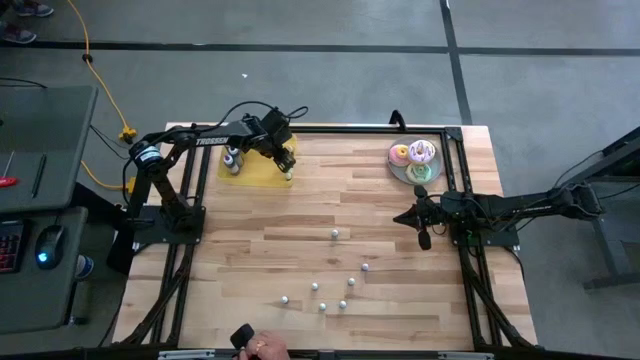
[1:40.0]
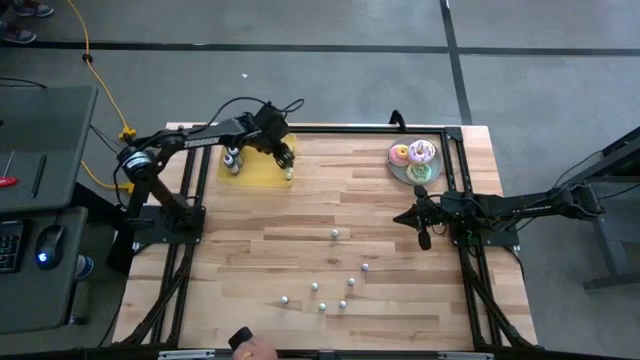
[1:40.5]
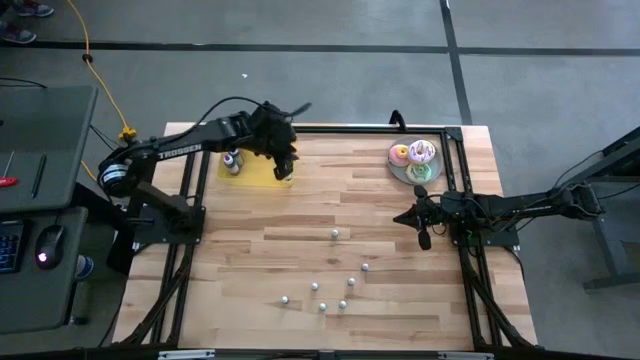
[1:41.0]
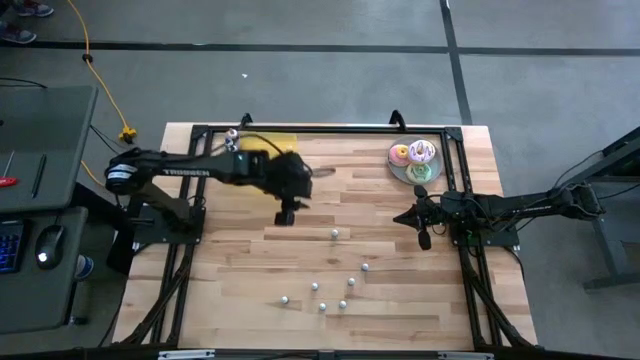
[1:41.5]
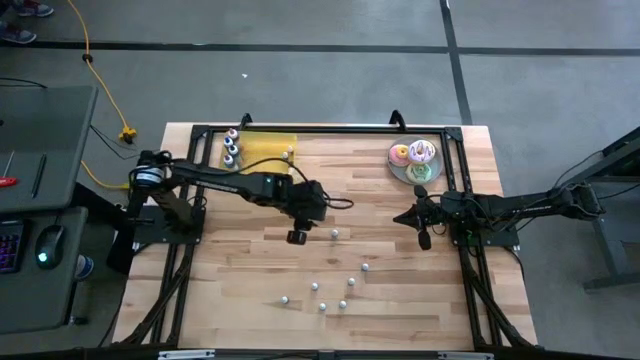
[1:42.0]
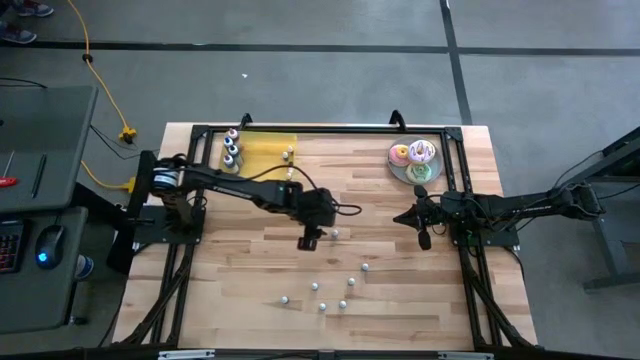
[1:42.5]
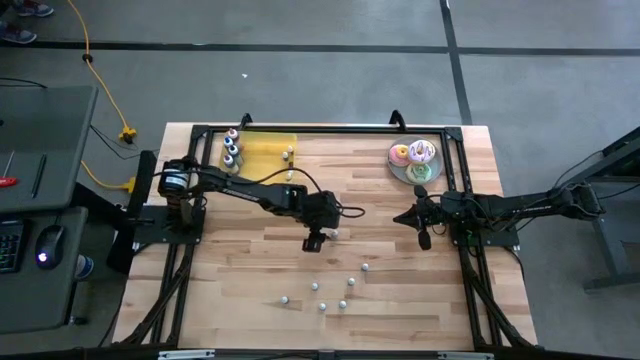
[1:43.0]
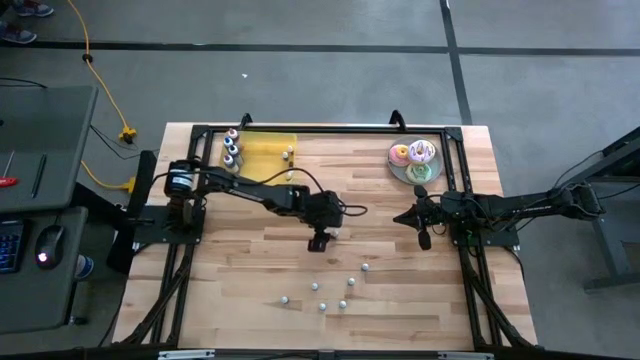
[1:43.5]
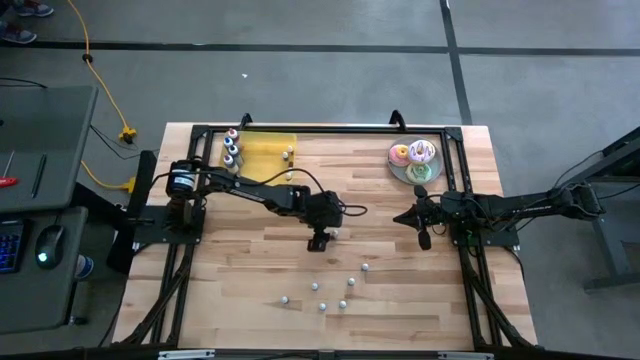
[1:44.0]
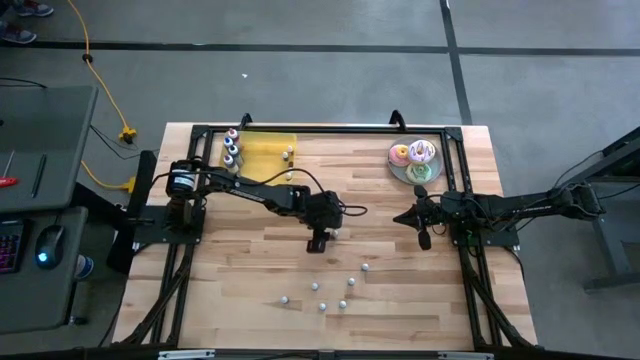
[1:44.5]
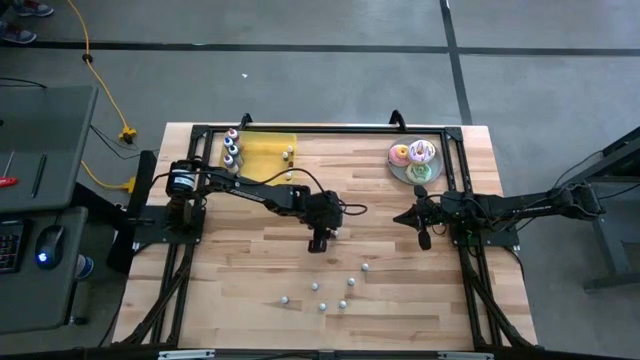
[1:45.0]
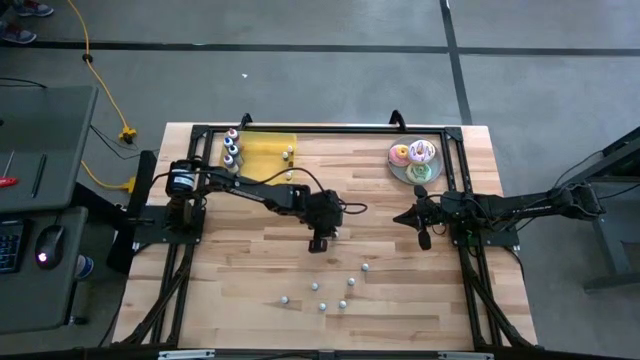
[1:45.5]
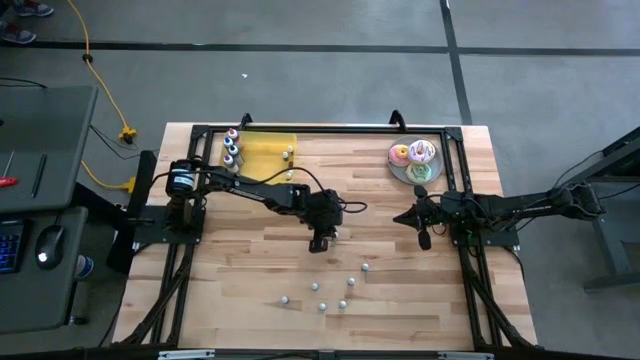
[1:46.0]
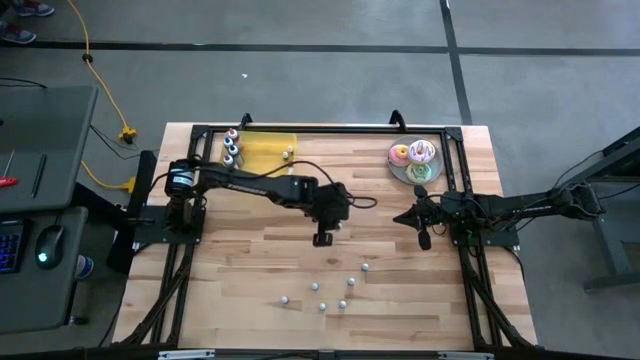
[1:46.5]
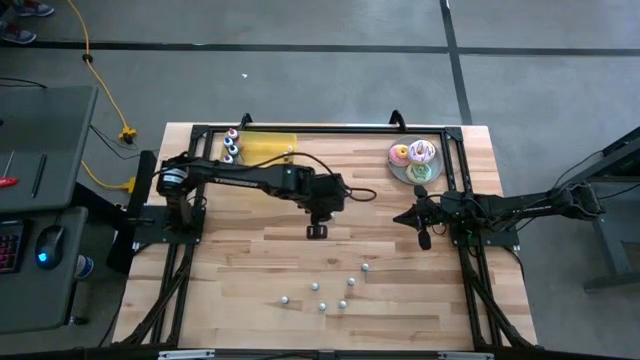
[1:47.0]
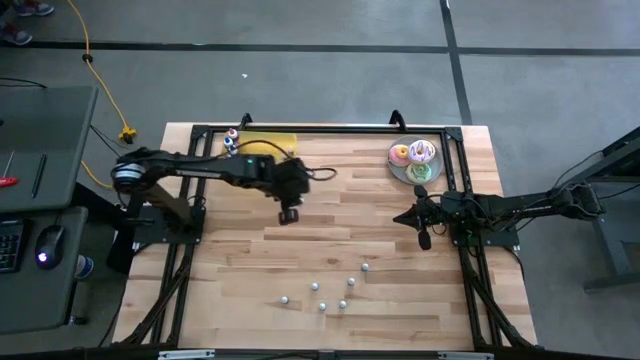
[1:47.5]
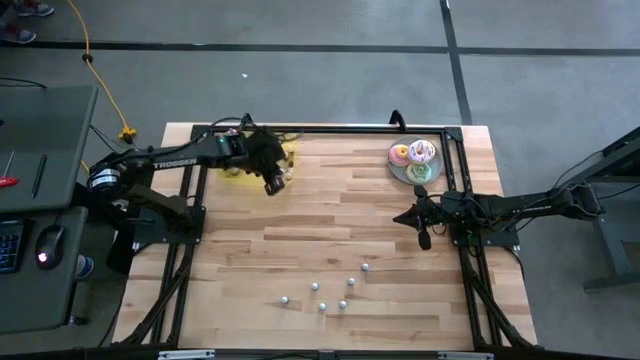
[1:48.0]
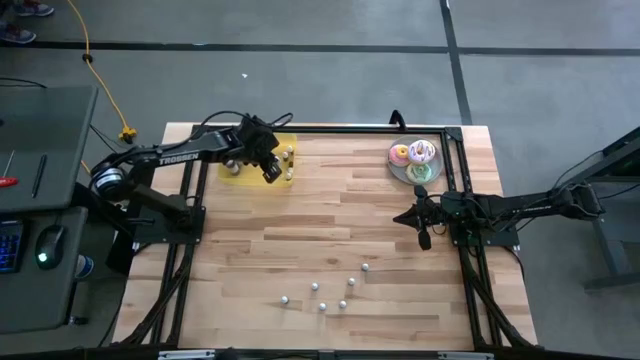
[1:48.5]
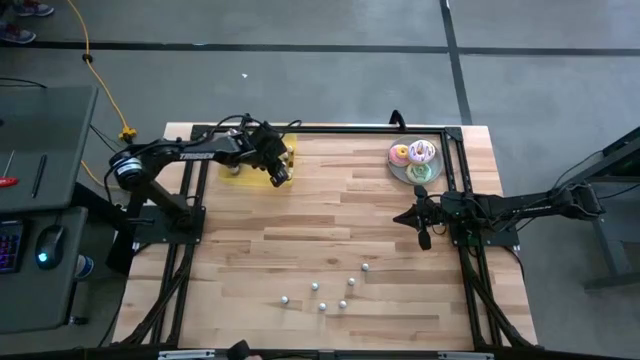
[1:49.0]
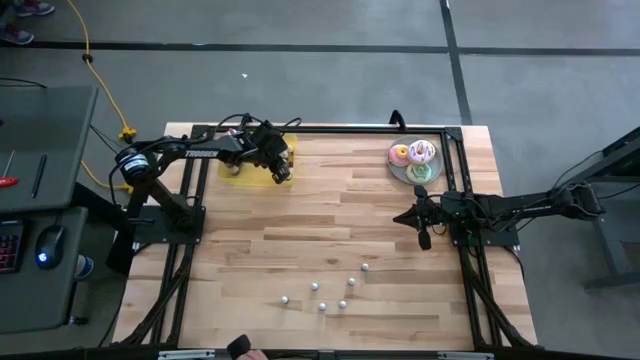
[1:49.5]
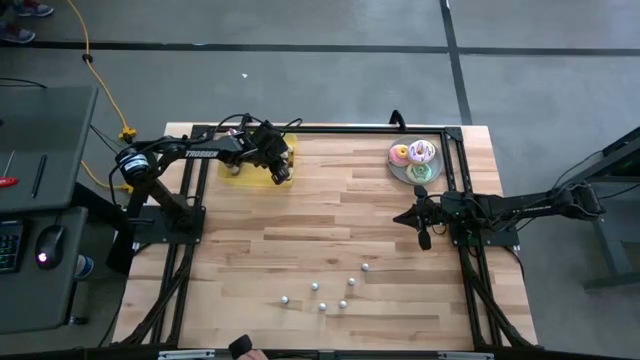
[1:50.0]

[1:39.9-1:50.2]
Task: Pick & Place food coloring
Put the small black food coloring bottle into the yellow bin

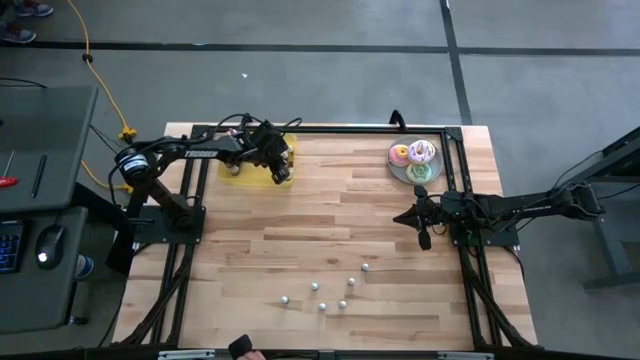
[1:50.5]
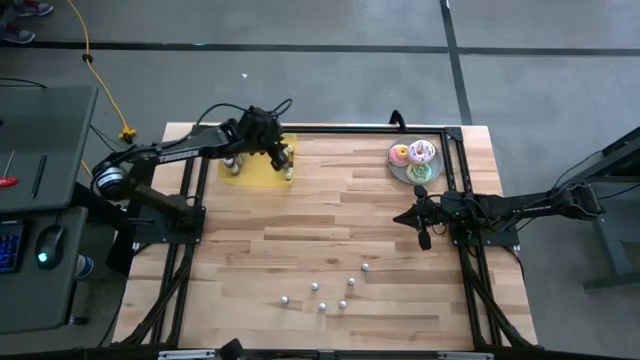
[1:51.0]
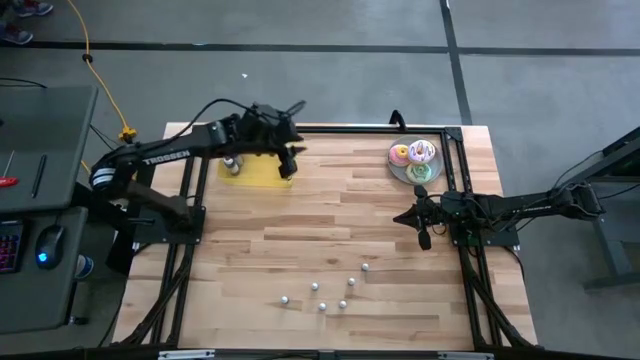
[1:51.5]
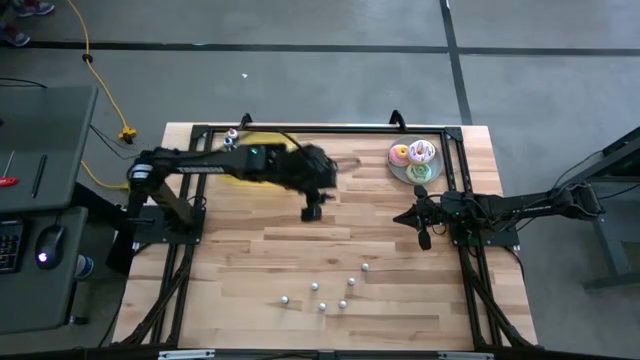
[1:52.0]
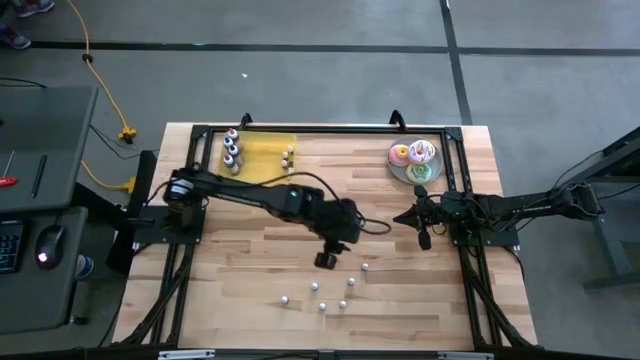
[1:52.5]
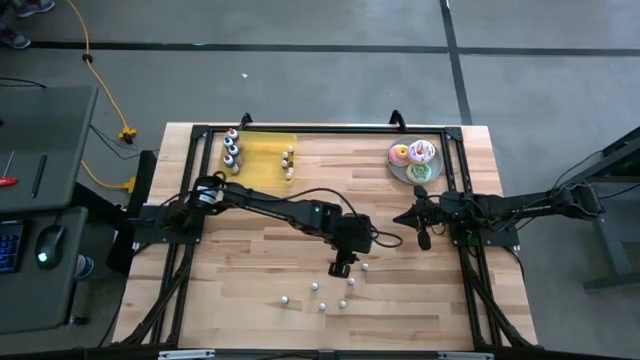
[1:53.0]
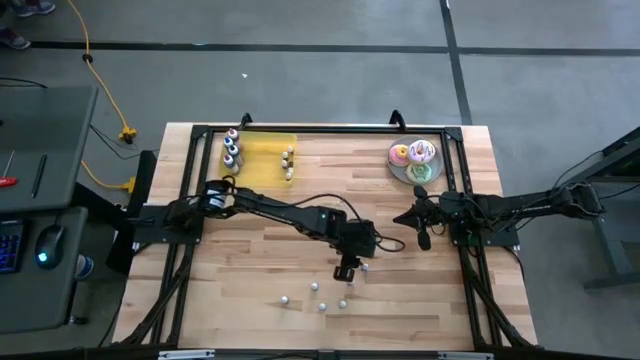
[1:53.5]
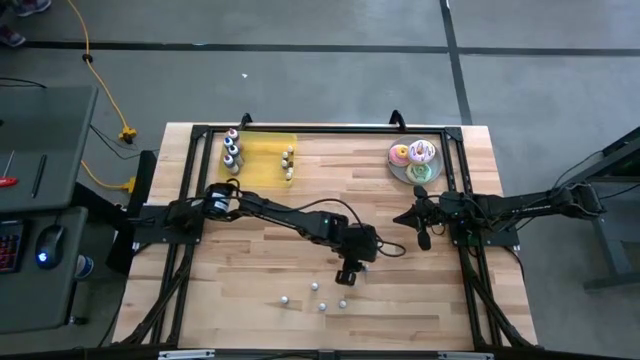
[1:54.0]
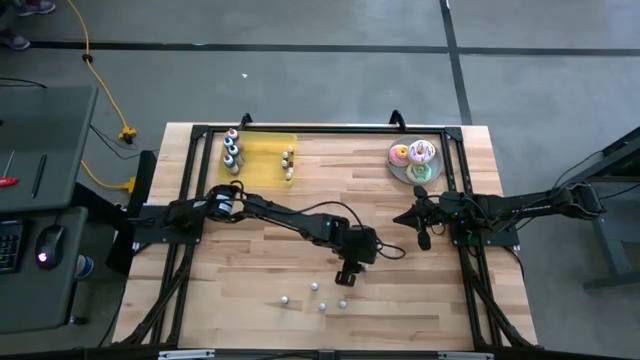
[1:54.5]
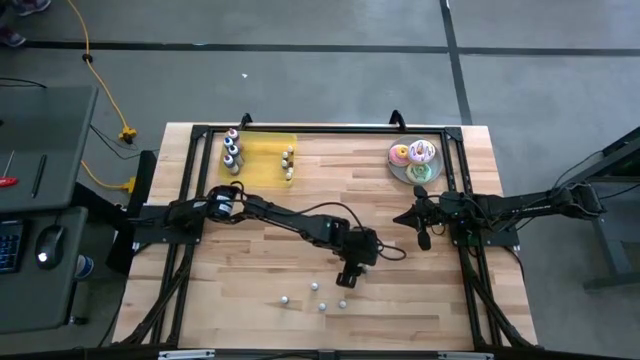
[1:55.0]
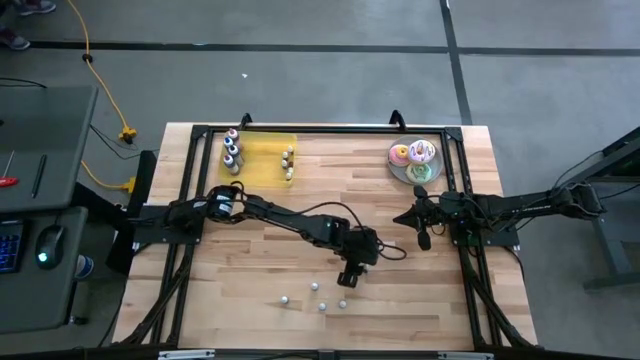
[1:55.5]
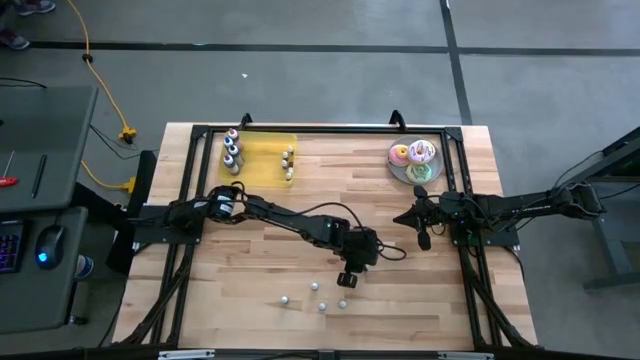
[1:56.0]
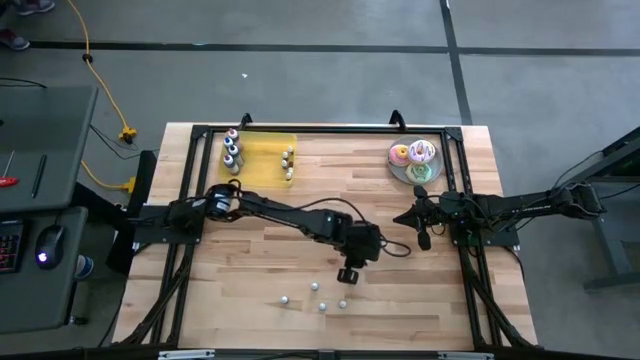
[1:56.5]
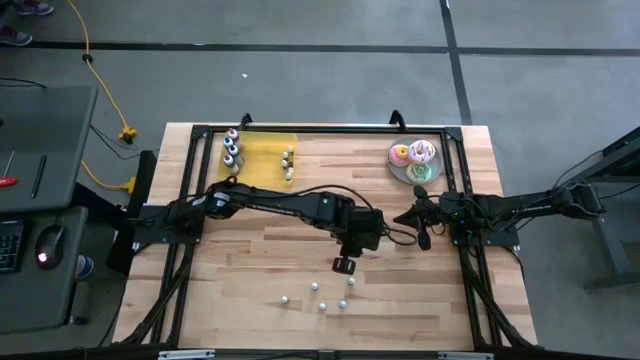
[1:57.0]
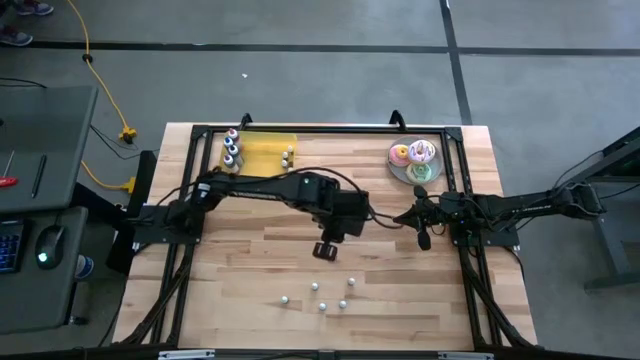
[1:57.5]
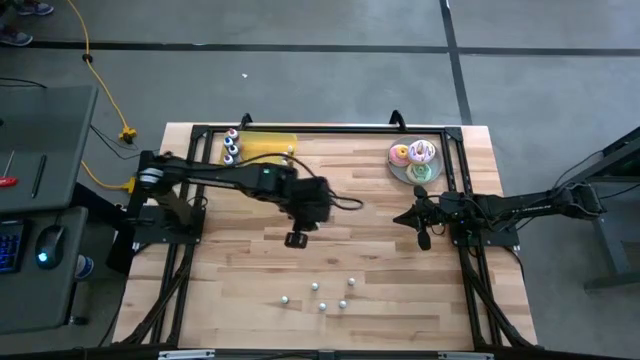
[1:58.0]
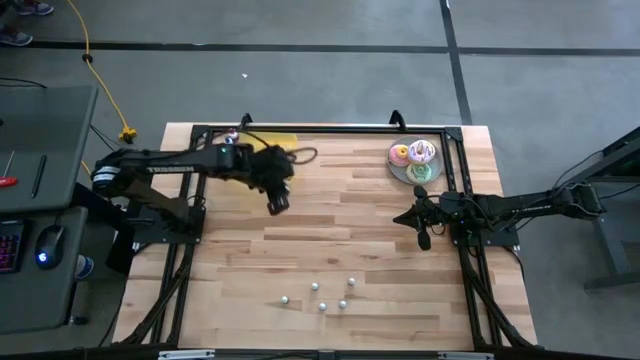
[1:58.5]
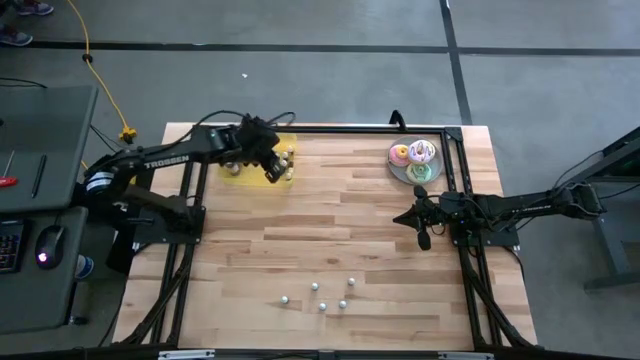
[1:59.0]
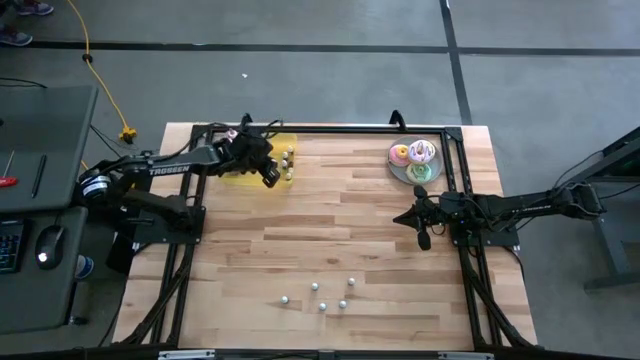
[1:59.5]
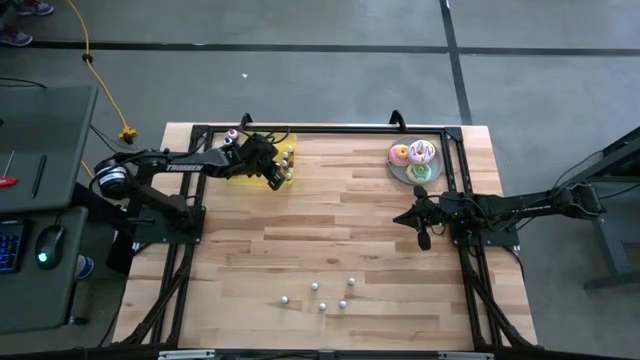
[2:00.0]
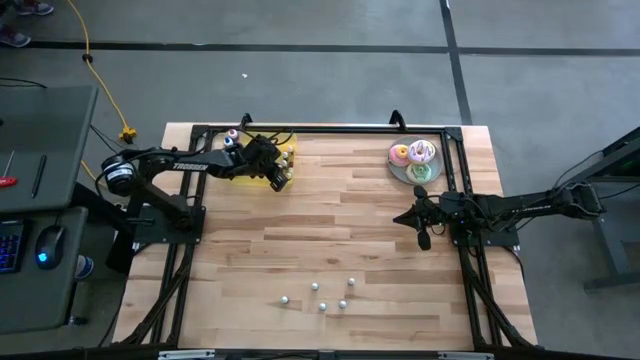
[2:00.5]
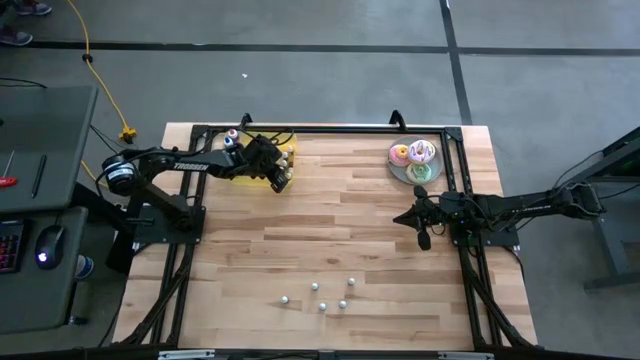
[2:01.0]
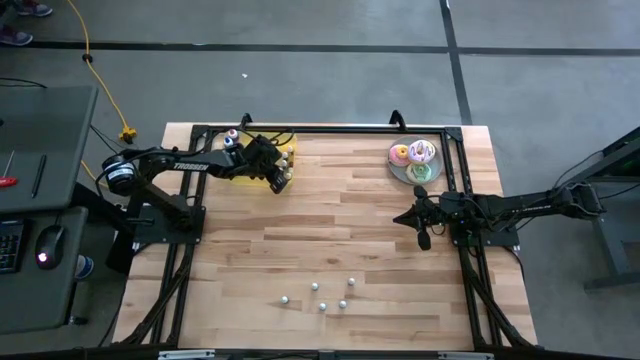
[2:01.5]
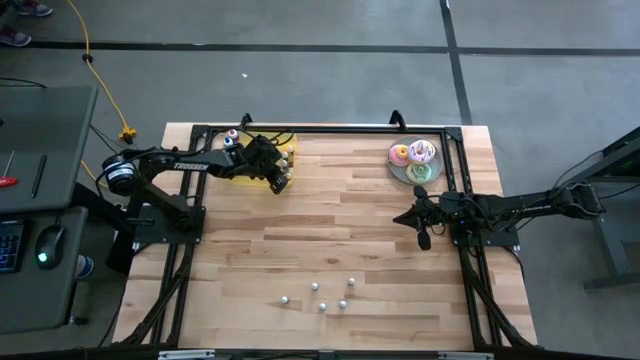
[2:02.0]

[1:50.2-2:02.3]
Put the small blue food coloring bottle into the yellow bin
